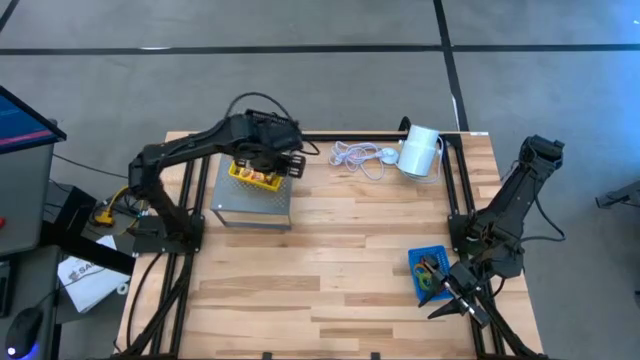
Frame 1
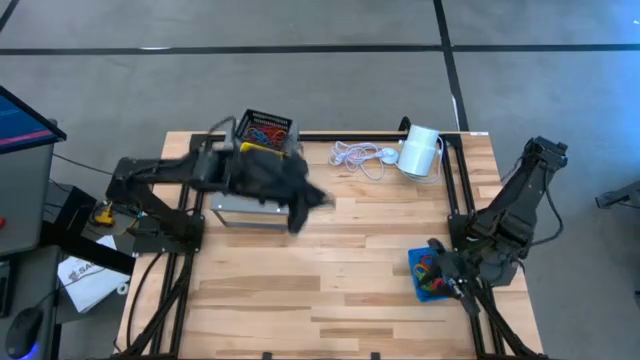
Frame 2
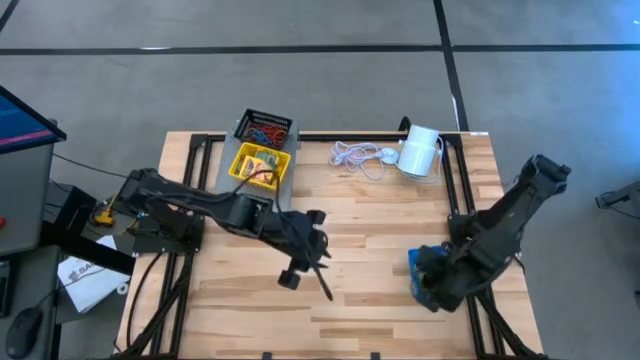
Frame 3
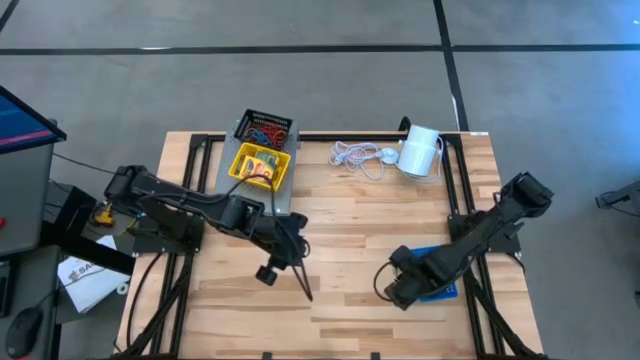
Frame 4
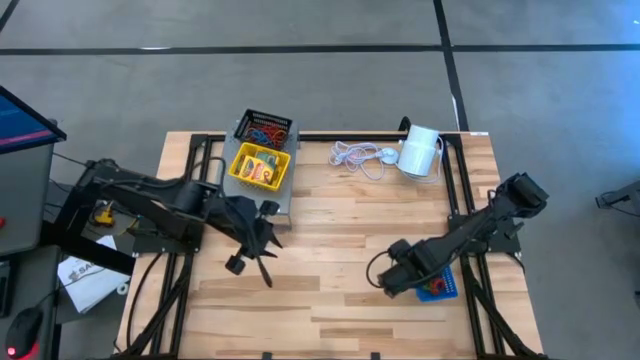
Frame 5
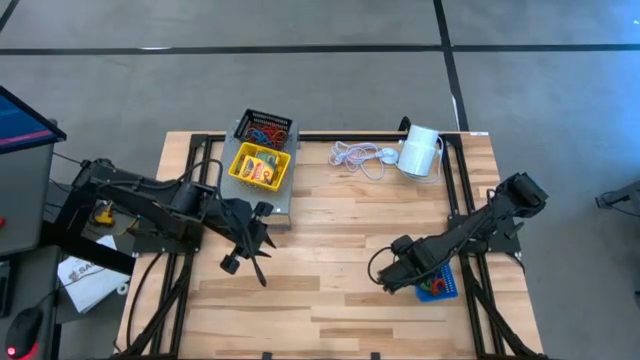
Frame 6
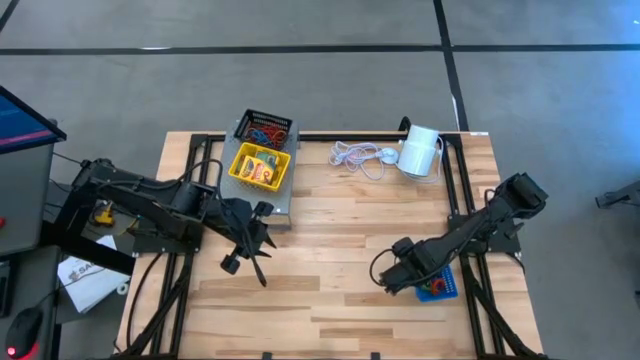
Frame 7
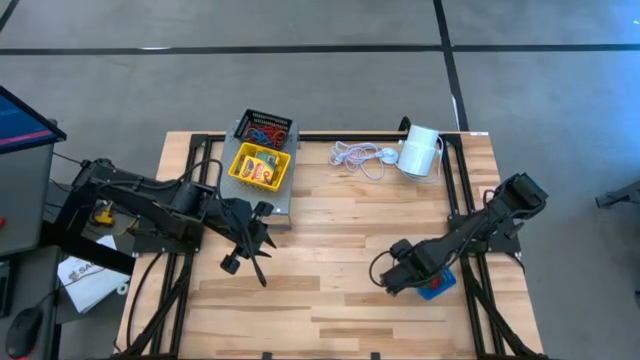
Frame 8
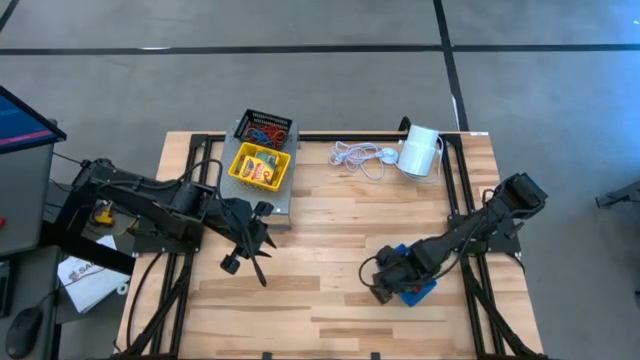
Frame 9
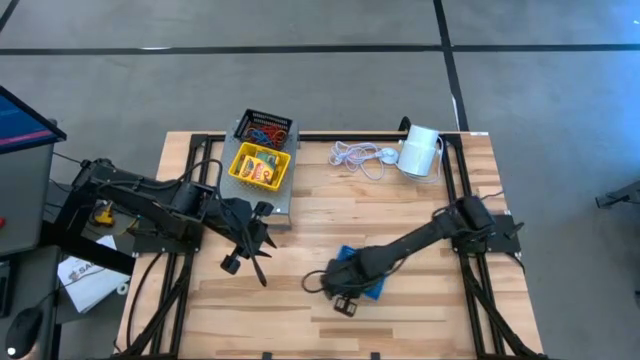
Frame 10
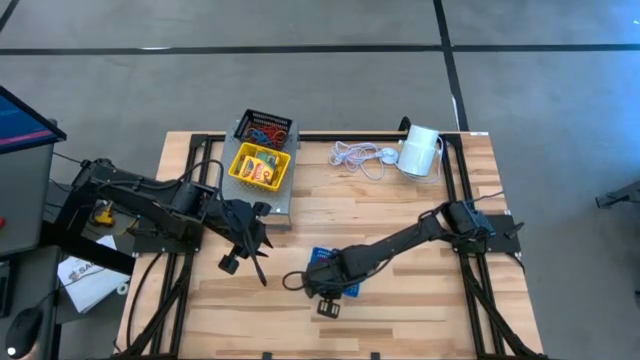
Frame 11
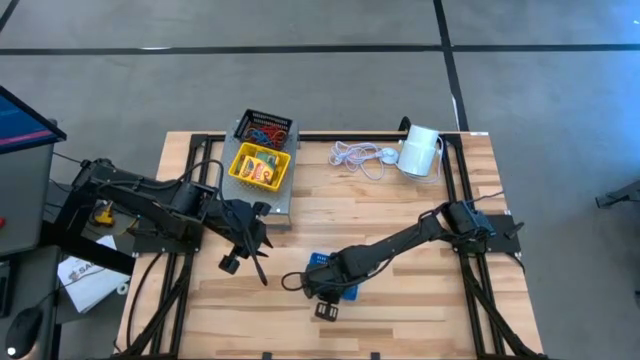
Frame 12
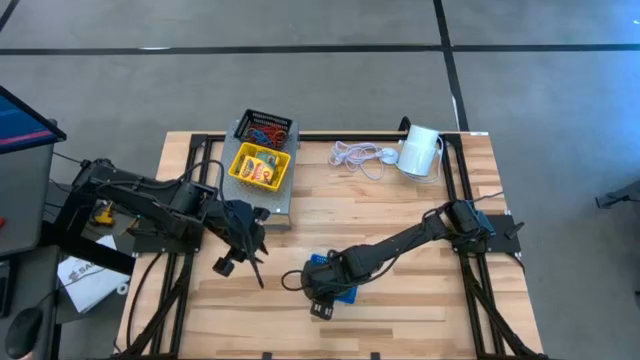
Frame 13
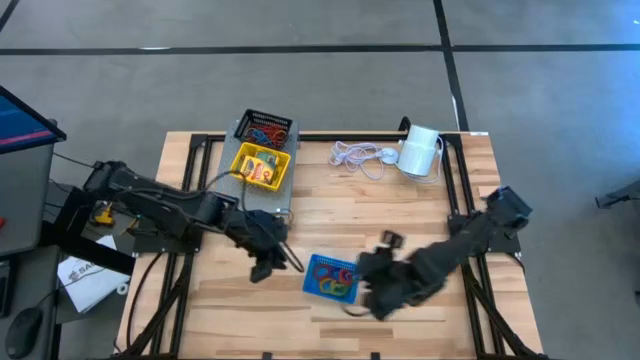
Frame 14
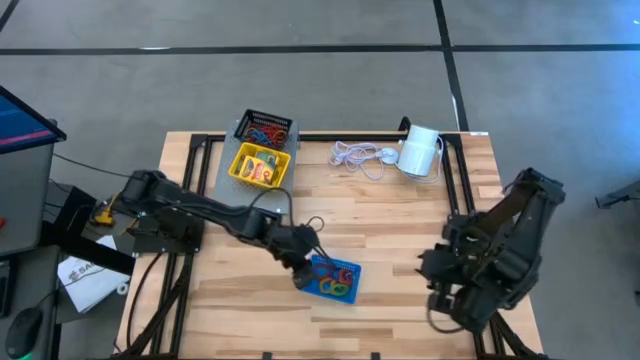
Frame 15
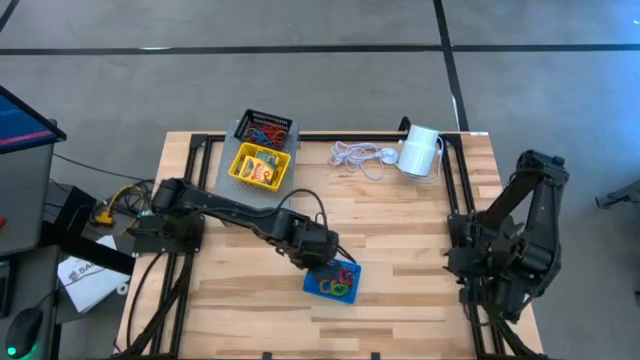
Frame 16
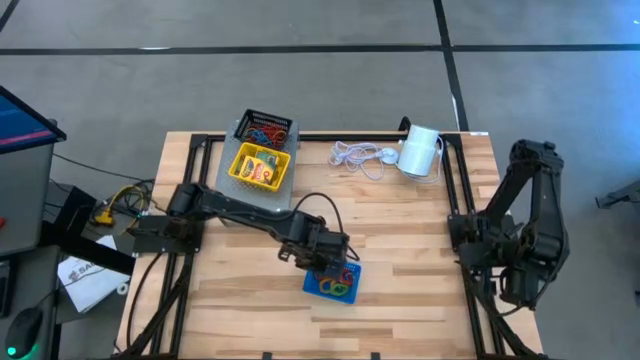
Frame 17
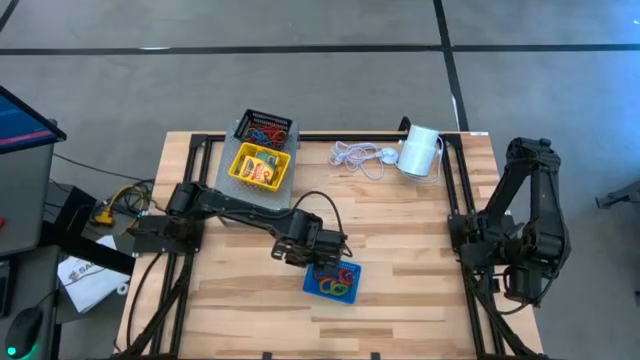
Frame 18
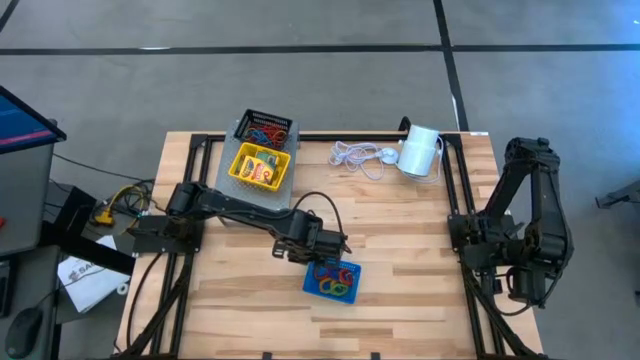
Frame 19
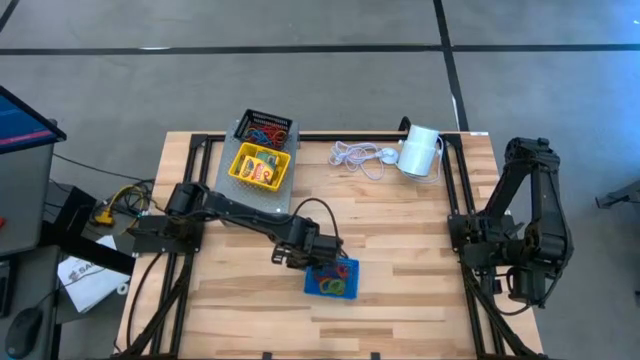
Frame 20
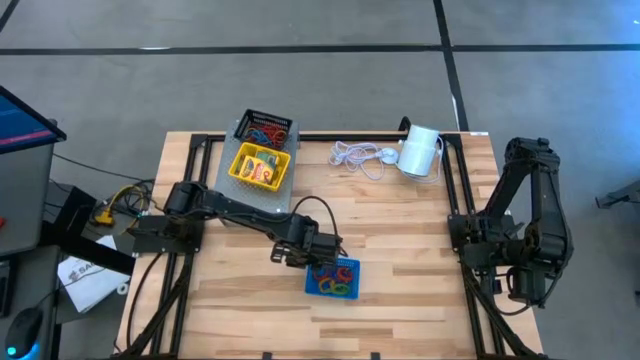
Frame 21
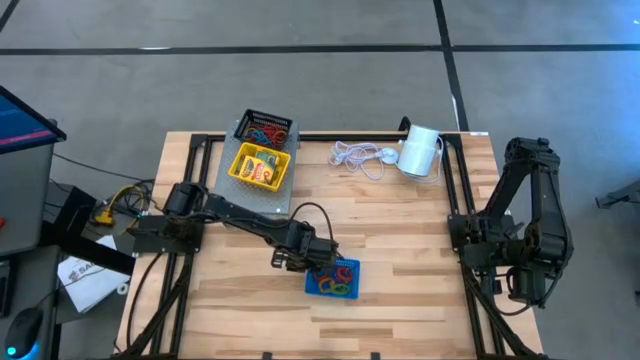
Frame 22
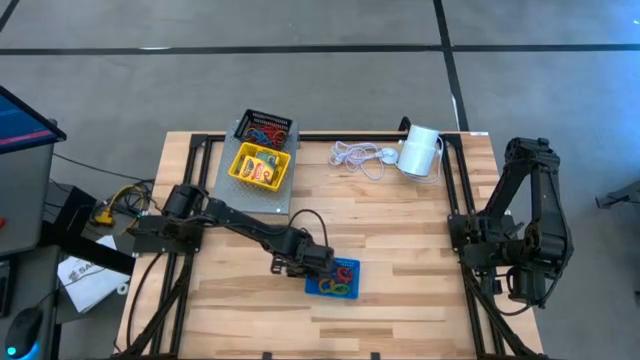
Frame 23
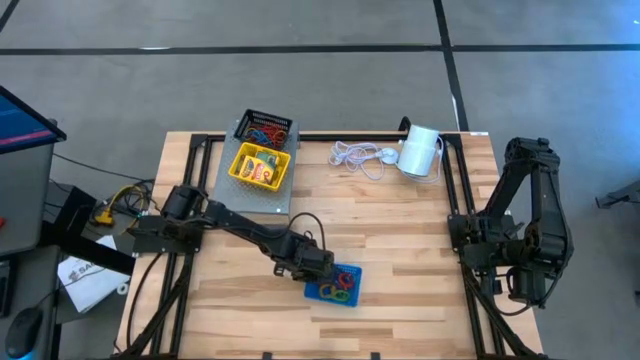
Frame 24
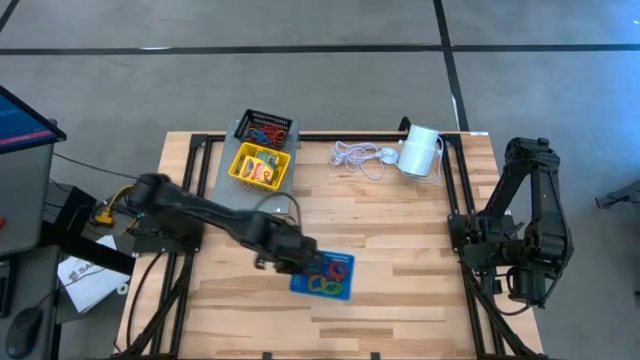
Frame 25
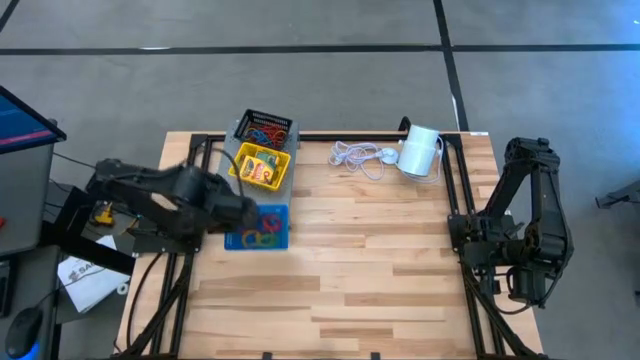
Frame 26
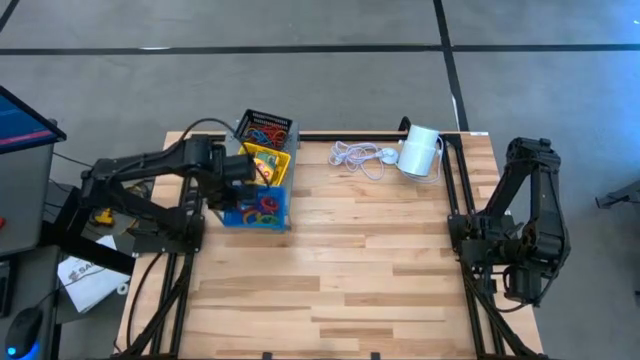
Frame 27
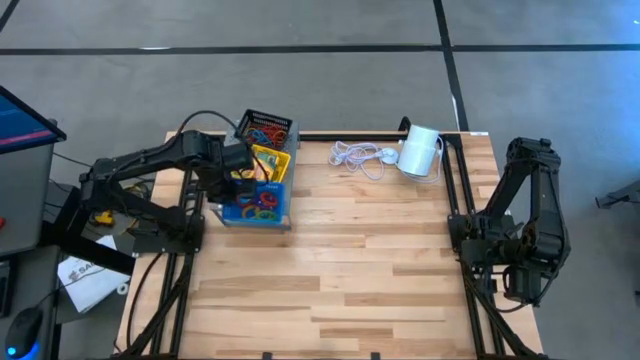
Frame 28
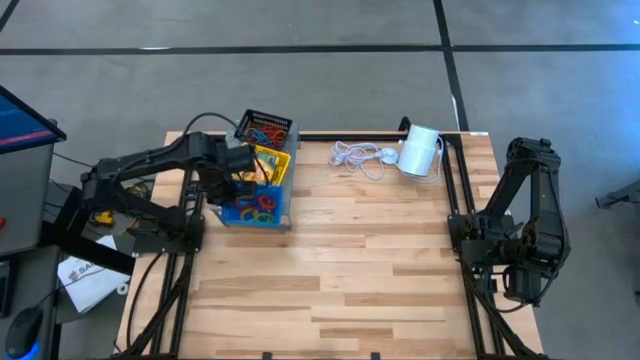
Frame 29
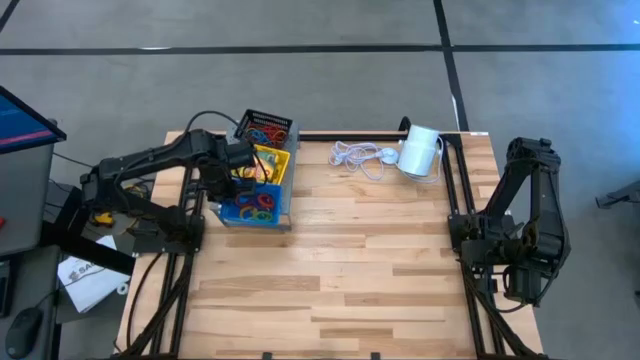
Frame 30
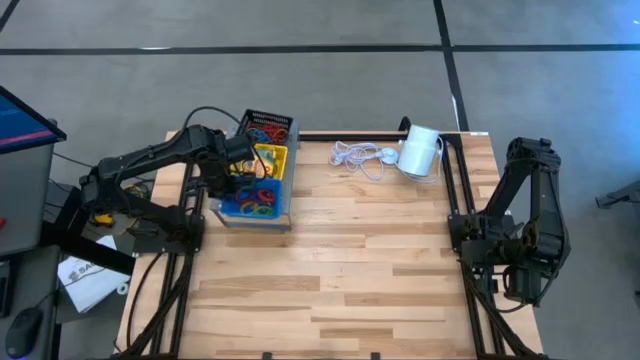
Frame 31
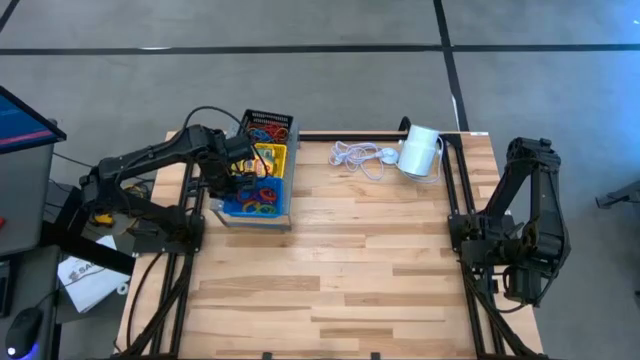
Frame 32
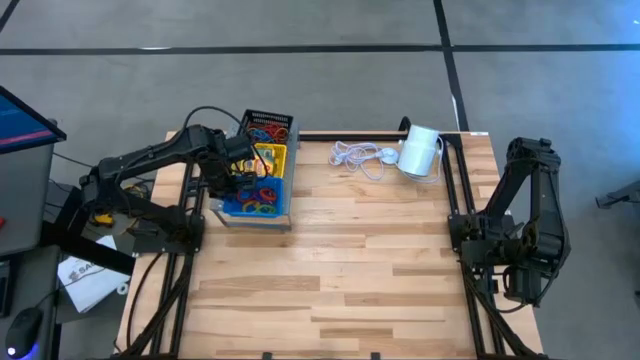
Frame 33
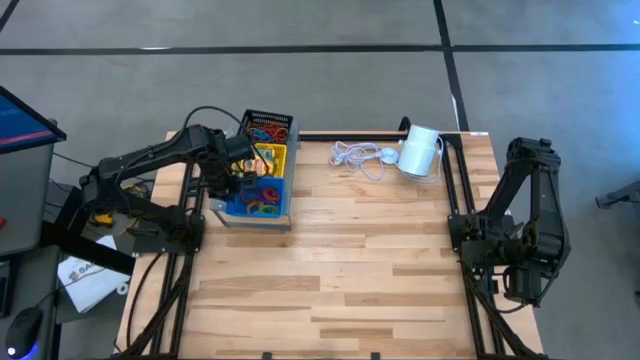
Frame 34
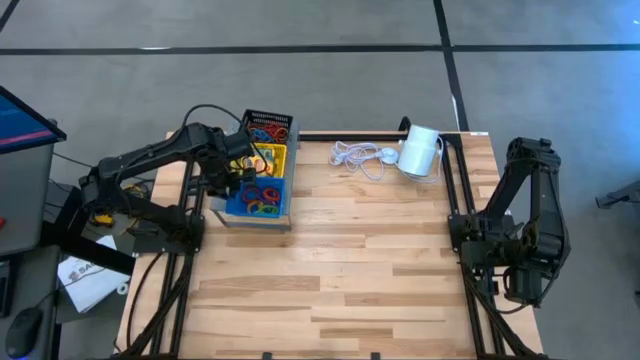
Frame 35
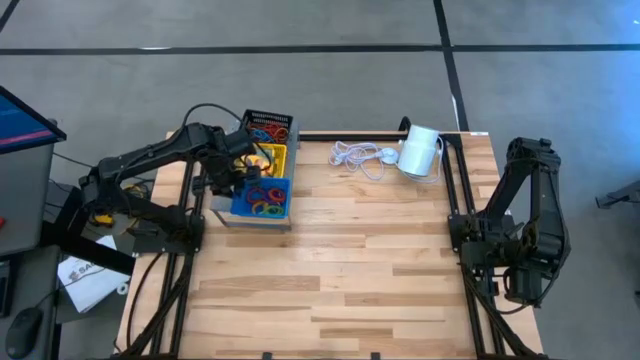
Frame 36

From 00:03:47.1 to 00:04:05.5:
Task: Pick & Place Office Desk Supplies
Put the blue bin with spring keychains on the shelf
